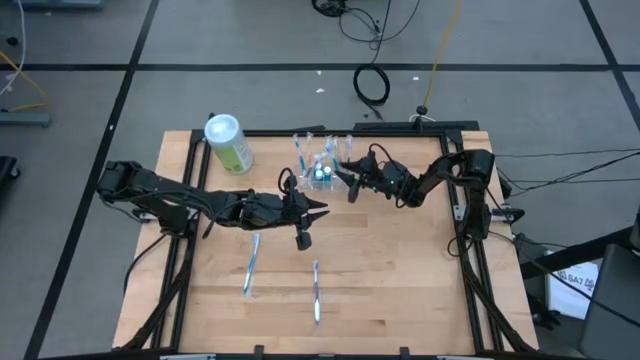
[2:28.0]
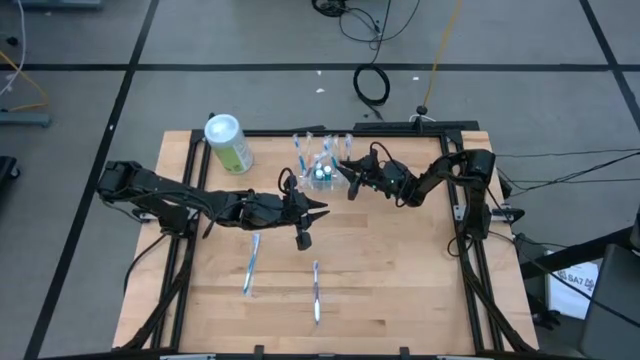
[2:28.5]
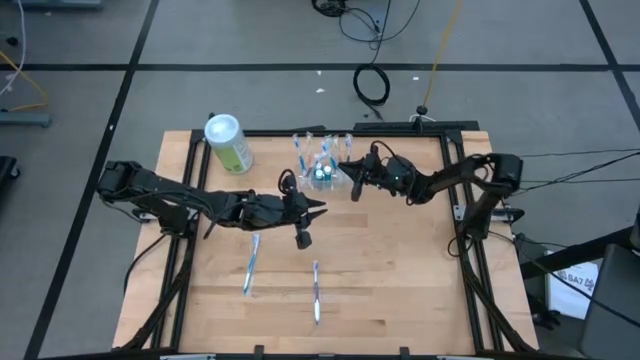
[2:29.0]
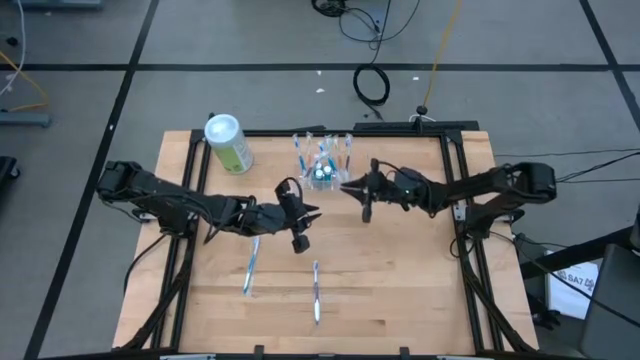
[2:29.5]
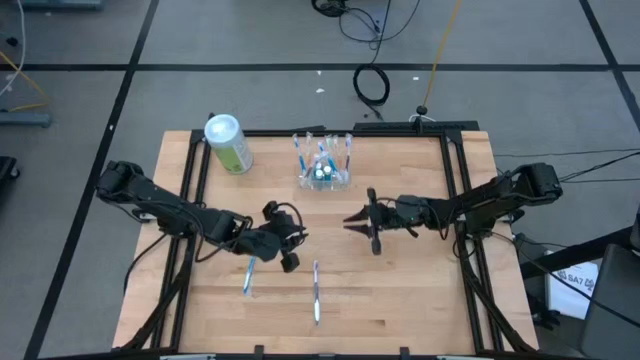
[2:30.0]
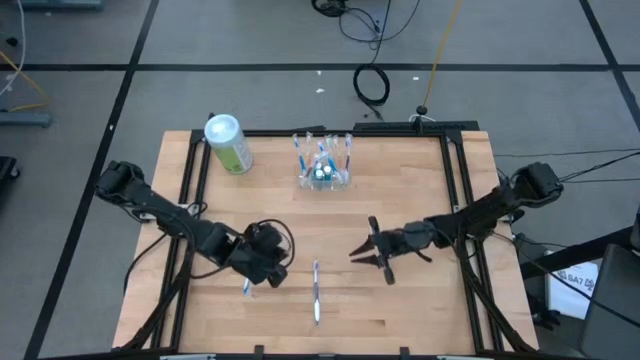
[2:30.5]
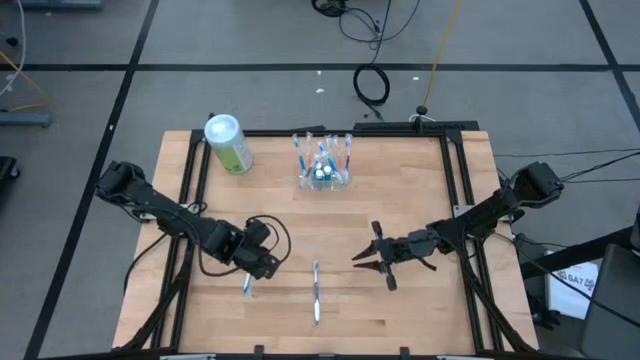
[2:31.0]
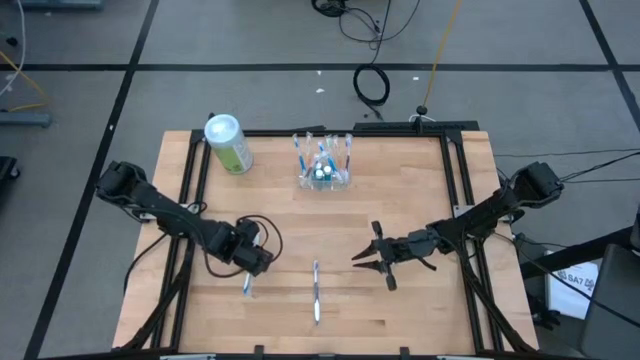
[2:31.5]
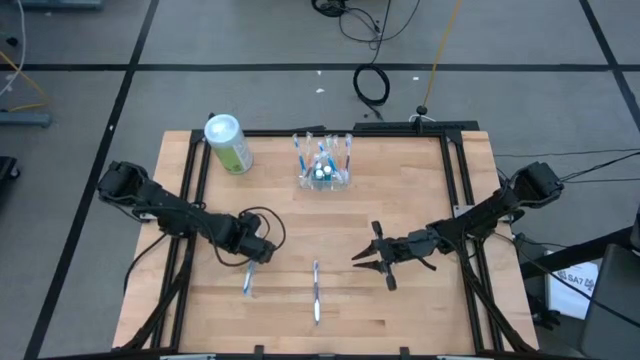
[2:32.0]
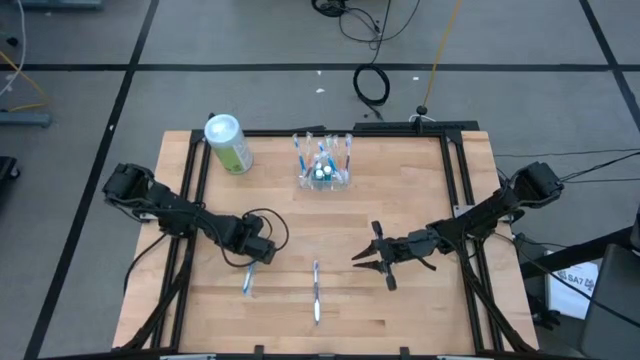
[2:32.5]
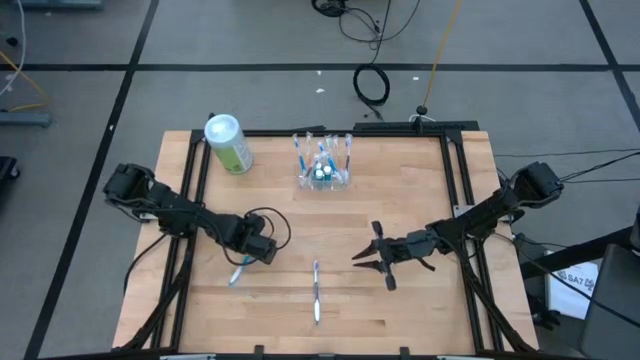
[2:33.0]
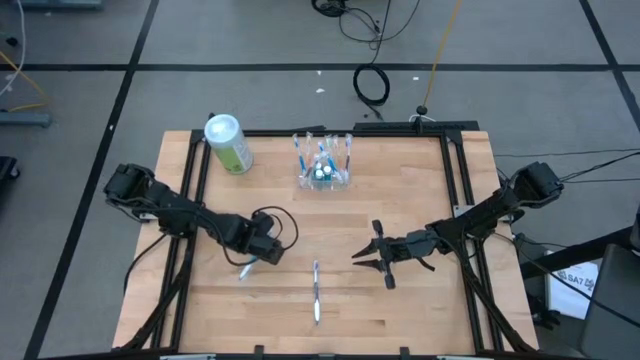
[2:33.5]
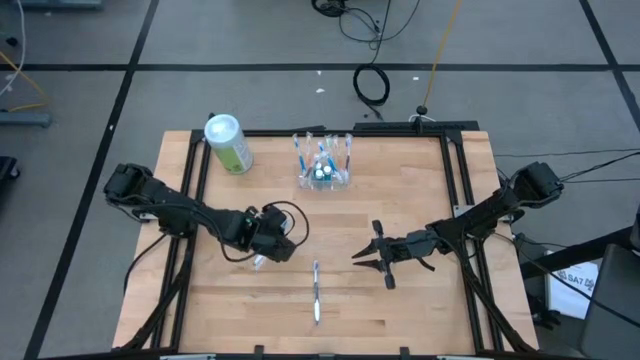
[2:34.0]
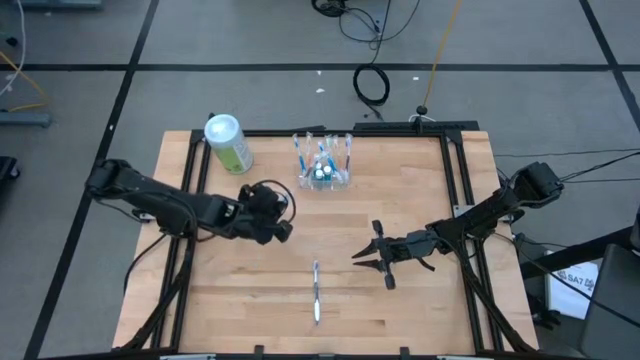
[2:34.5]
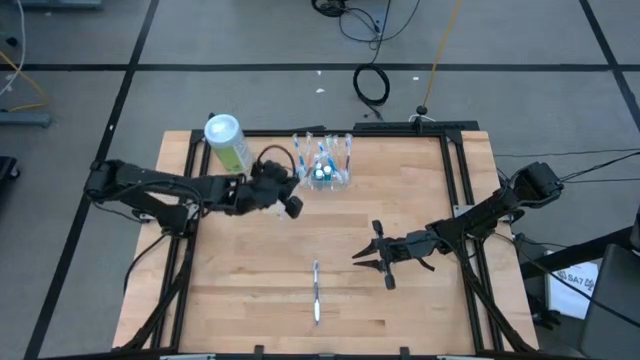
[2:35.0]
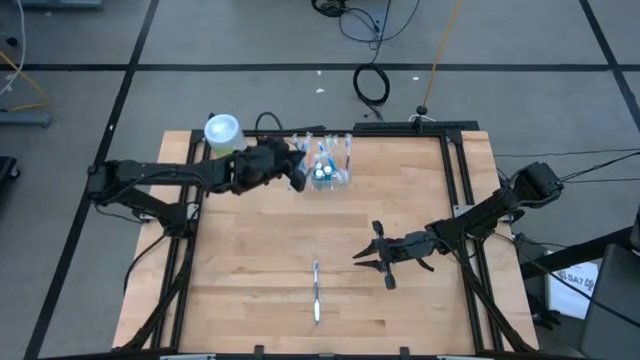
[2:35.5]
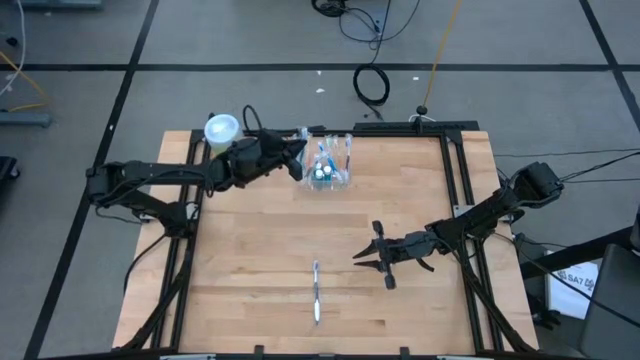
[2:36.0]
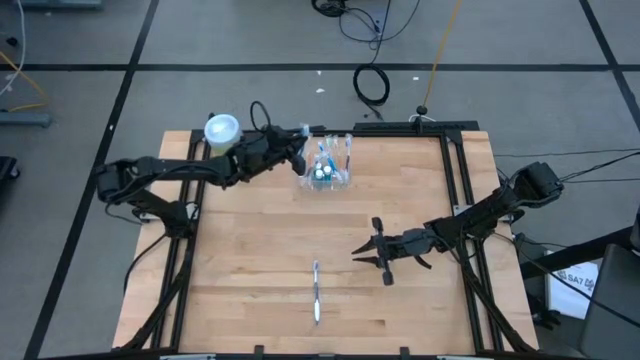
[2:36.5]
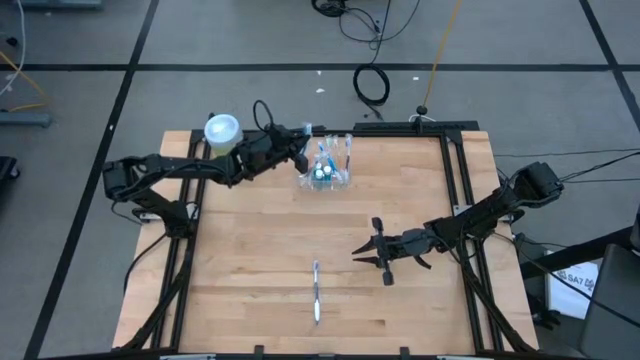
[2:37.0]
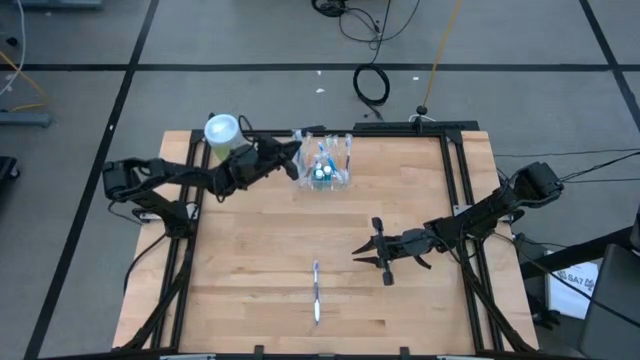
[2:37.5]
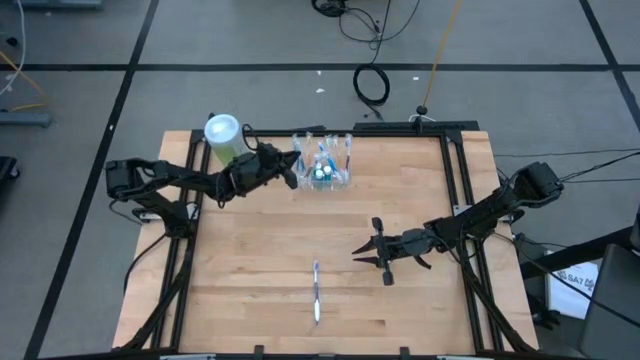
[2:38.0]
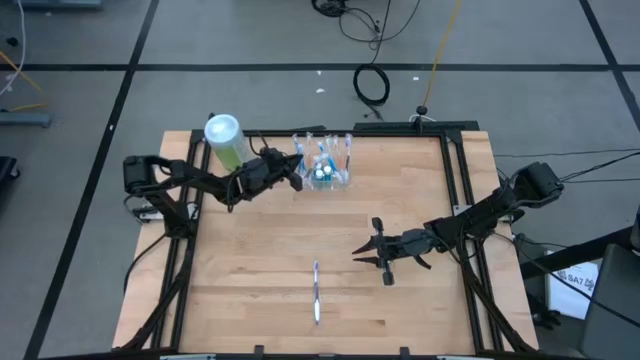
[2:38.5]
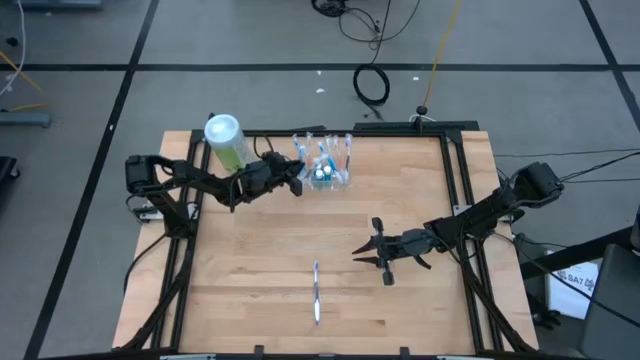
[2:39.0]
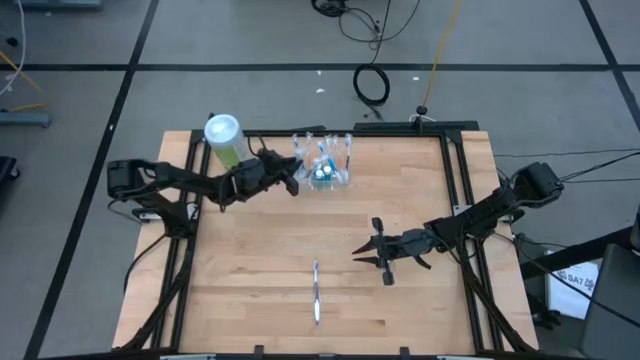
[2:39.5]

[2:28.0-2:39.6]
Task: Pick & Place toothbrushing station
Put the blue toothbrush into the transparent organizer

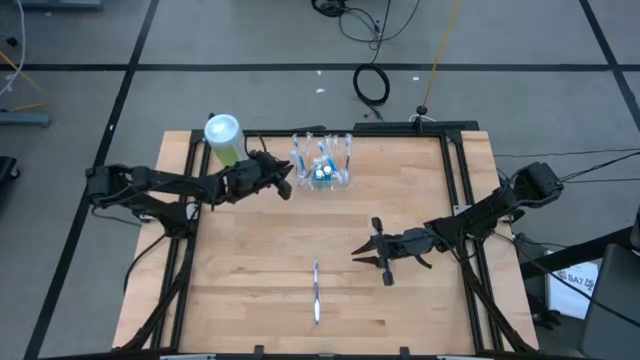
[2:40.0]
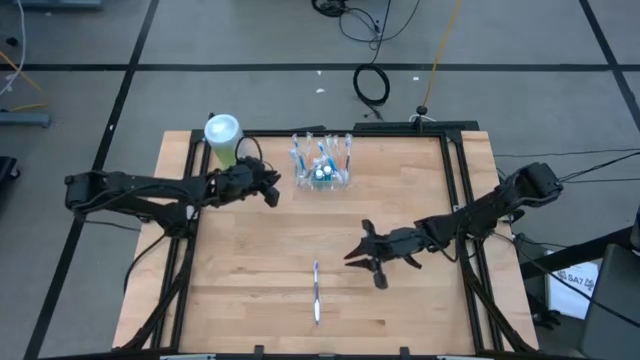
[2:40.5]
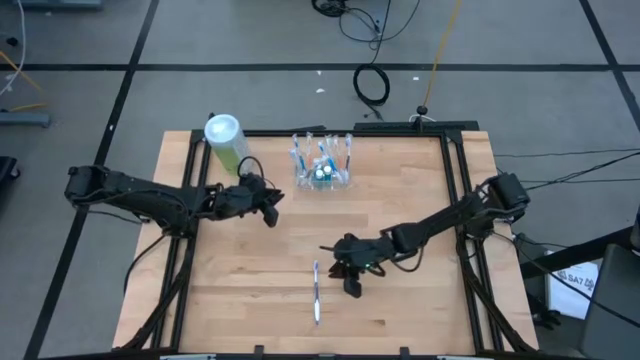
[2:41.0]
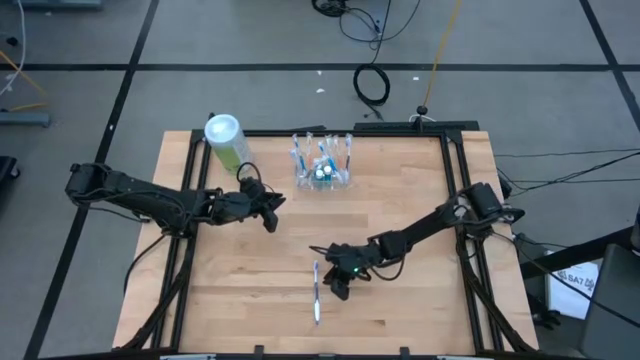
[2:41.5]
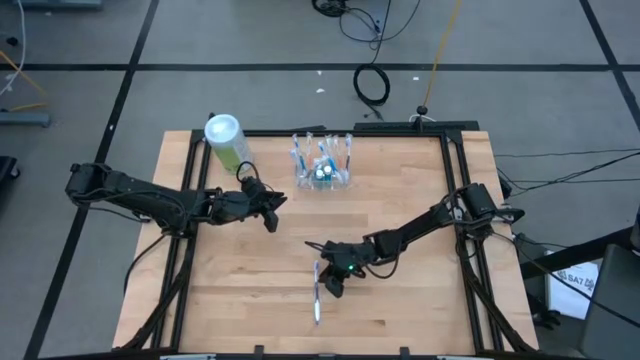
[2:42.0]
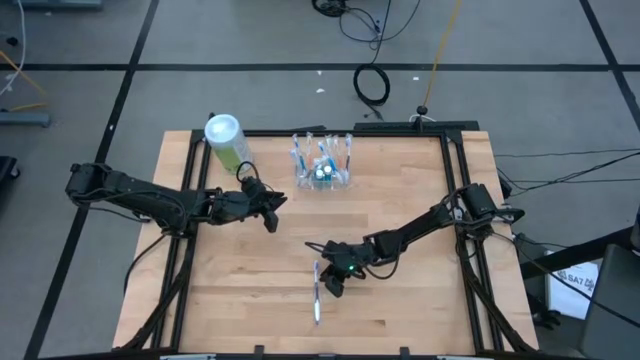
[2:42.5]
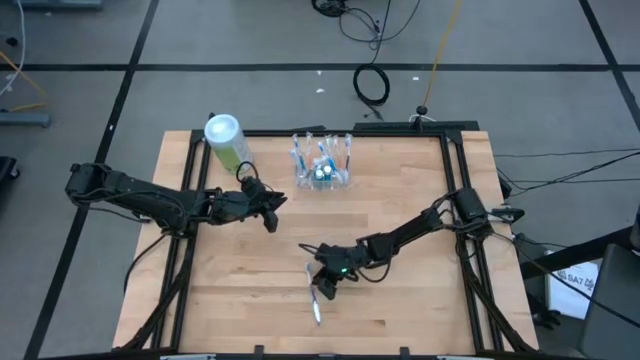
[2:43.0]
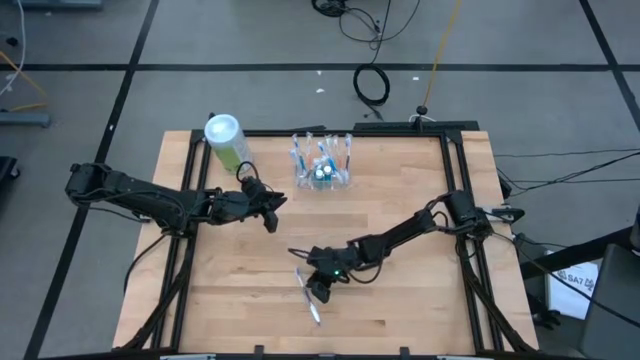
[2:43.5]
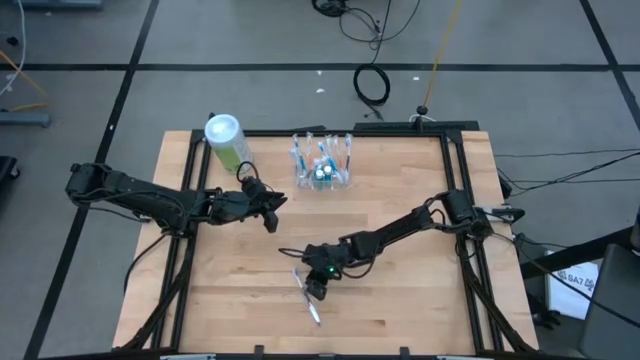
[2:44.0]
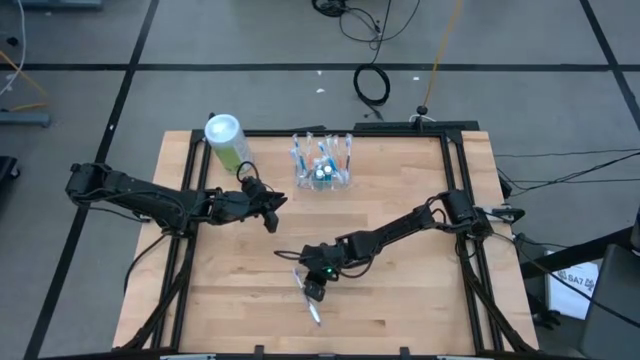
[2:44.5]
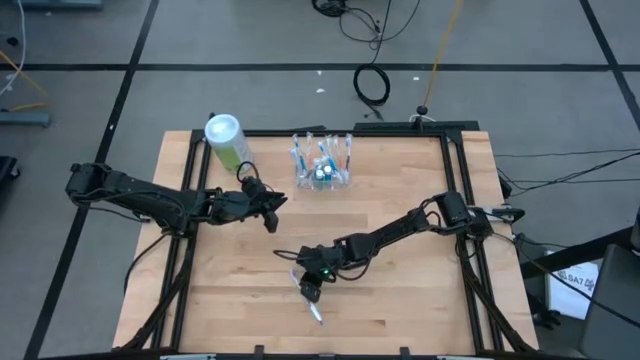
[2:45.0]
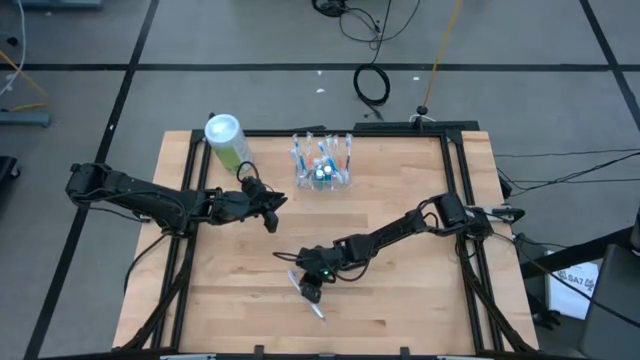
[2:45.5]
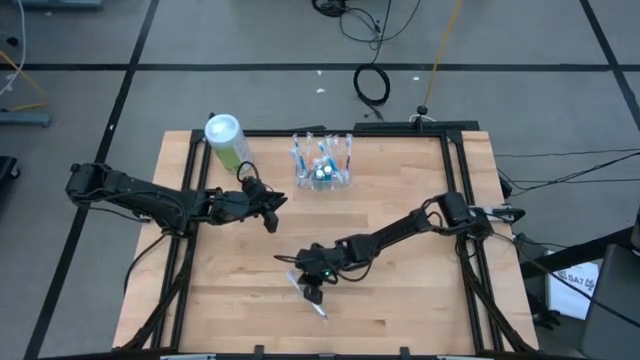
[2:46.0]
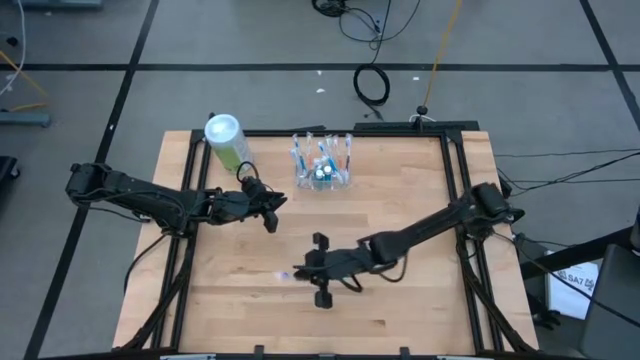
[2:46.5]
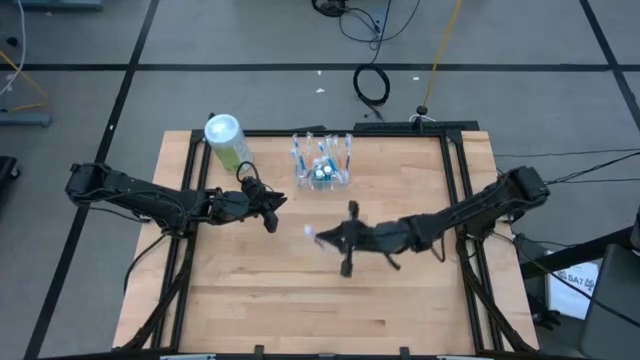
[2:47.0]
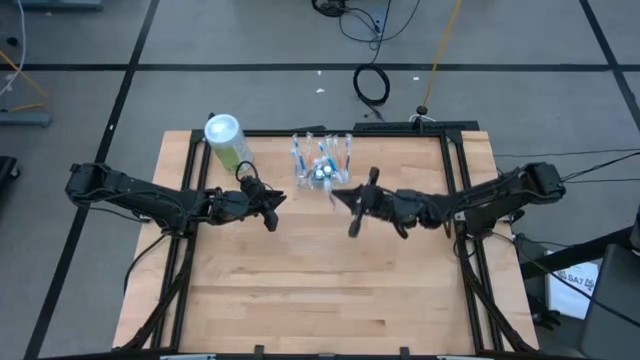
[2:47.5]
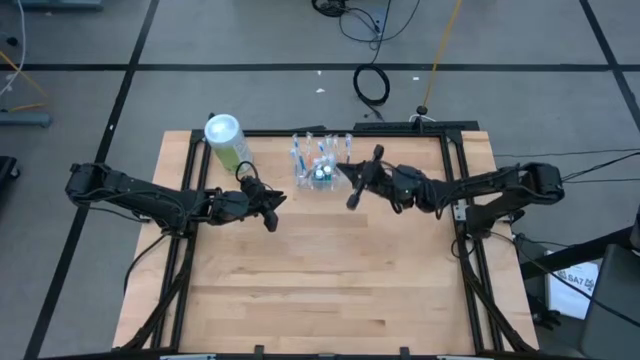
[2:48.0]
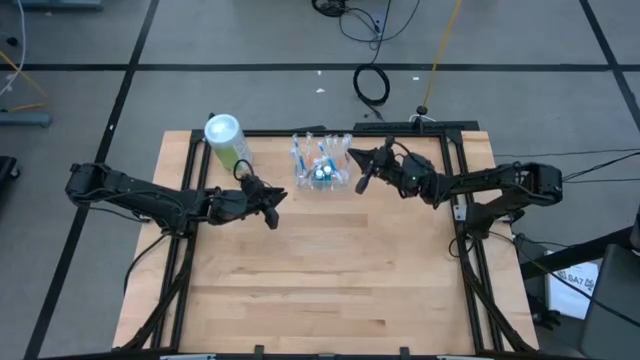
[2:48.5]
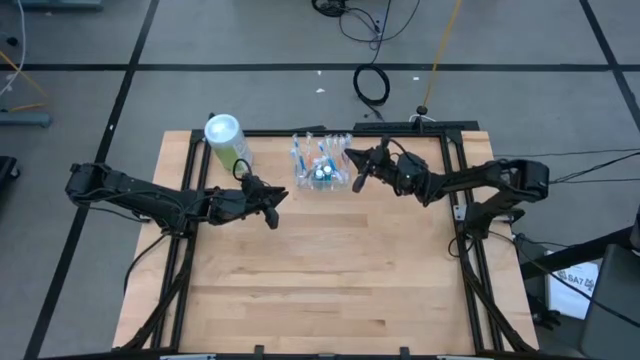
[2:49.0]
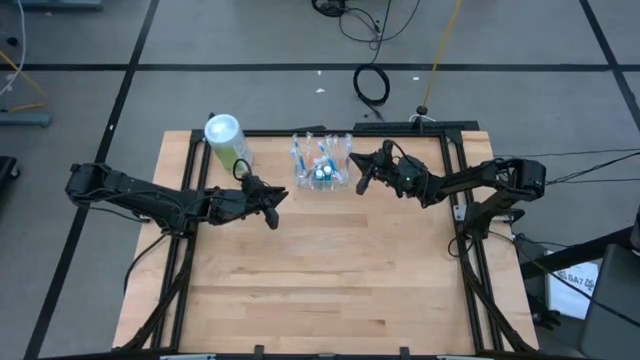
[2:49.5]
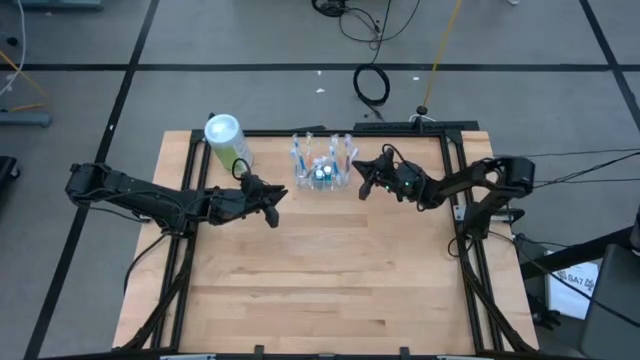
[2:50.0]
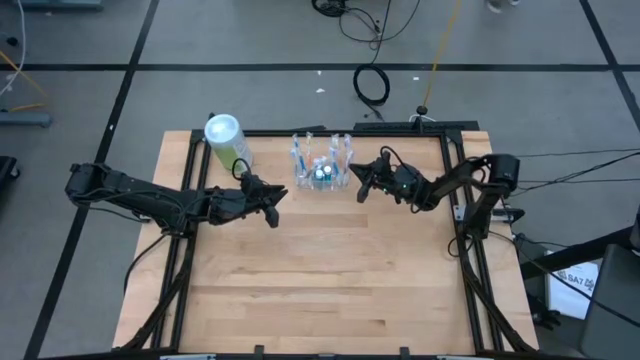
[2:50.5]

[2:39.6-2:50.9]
Put the purple toothbrush into the transparent organizer
